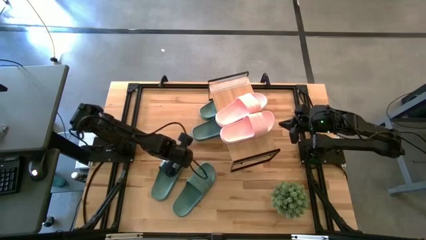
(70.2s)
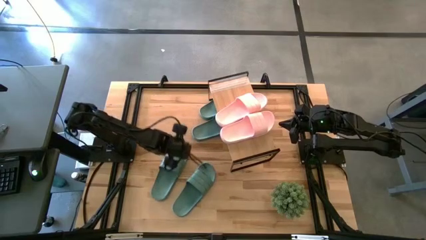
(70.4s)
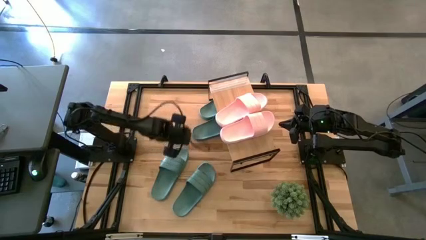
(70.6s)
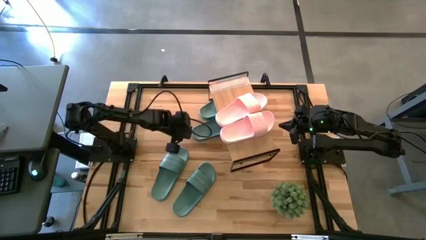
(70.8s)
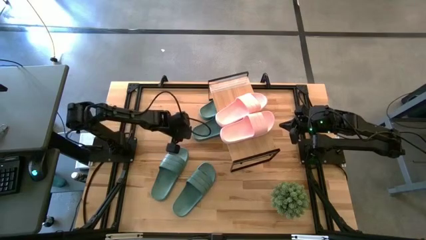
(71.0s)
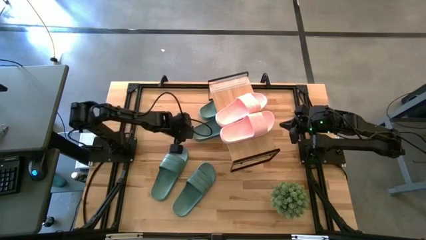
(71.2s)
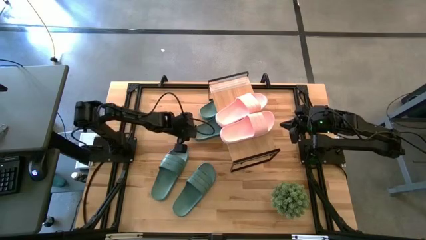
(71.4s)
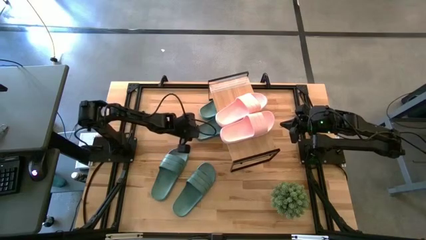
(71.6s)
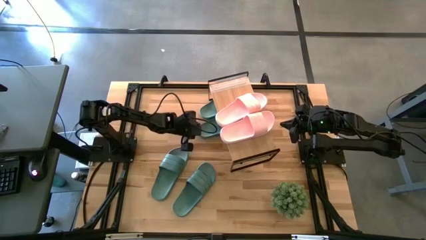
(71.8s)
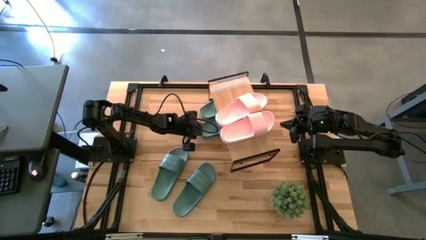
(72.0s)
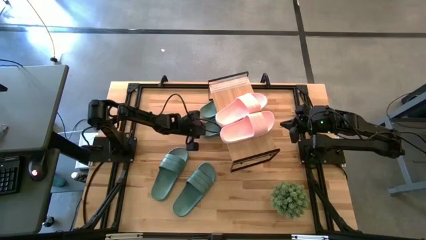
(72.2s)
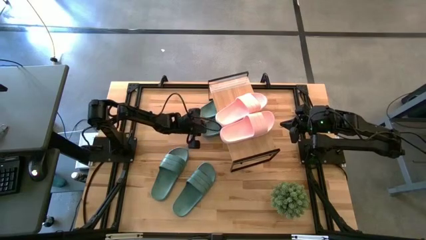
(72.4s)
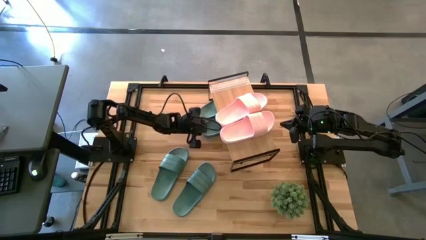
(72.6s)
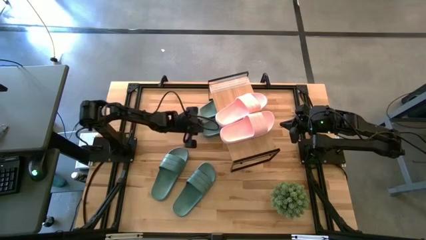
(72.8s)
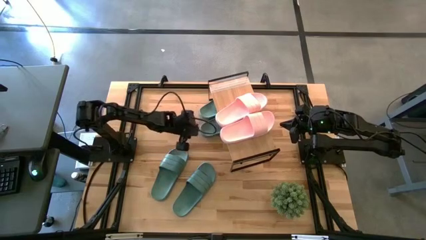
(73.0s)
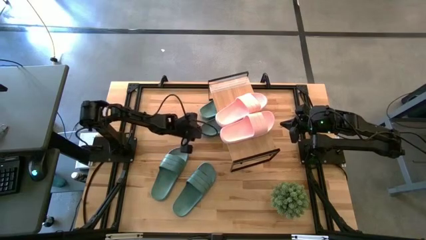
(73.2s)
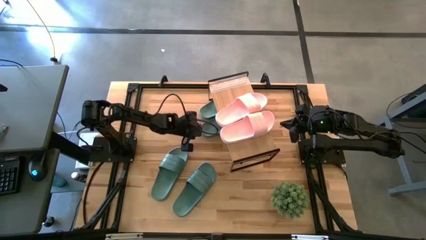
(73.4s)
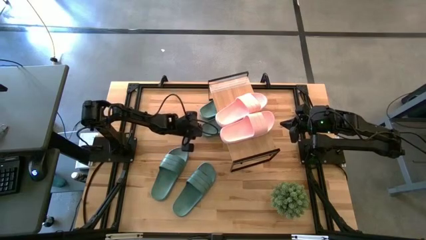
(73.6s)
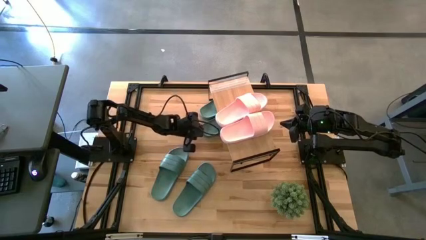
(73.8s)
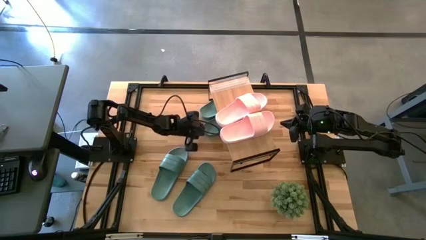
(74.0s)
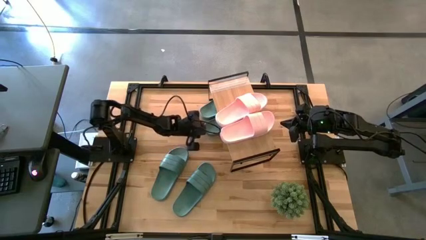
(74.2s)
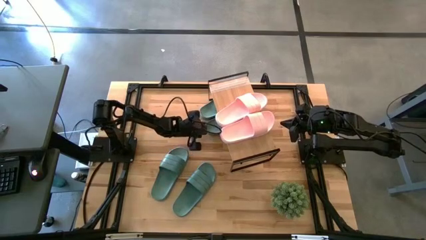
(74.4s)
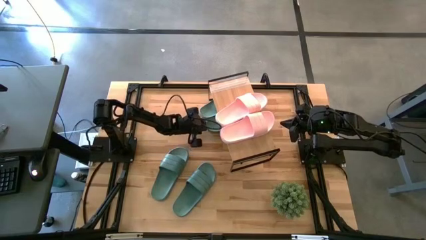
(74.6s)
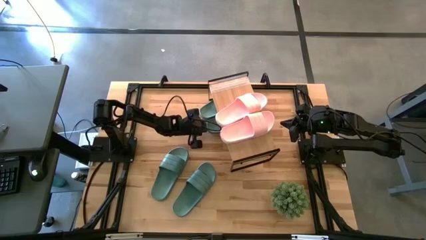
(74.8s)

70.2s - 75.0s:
Task: Pick and place slides into the shelf
Put the green slide under the shelf

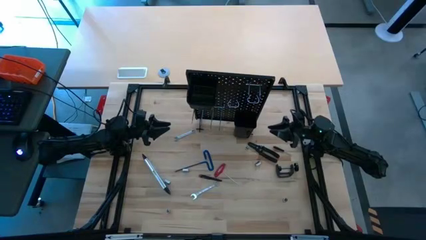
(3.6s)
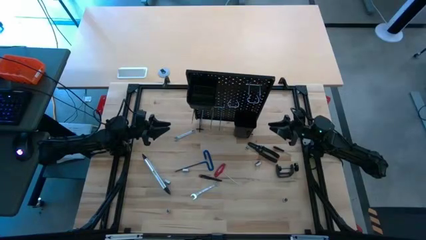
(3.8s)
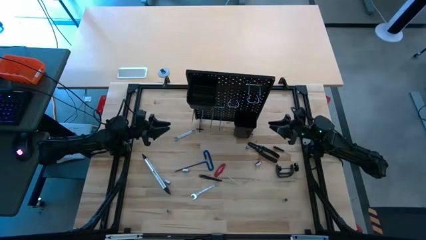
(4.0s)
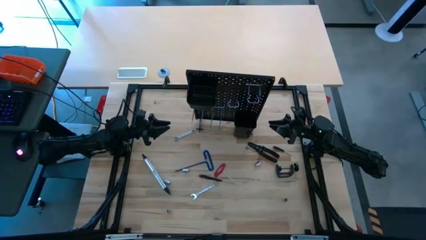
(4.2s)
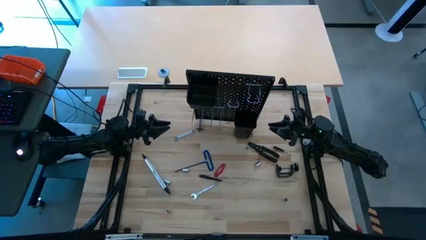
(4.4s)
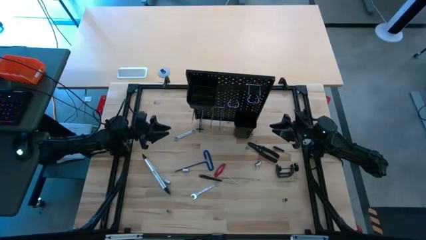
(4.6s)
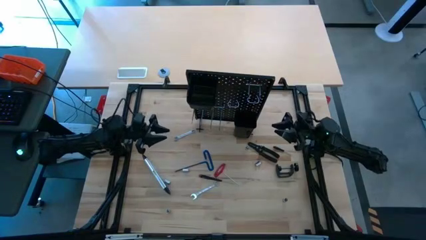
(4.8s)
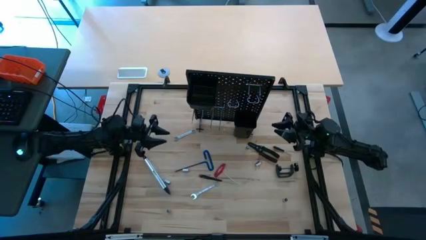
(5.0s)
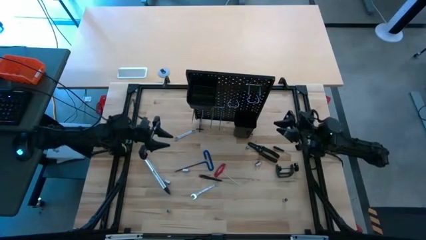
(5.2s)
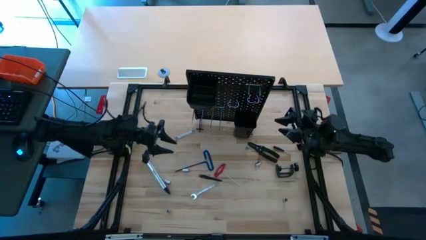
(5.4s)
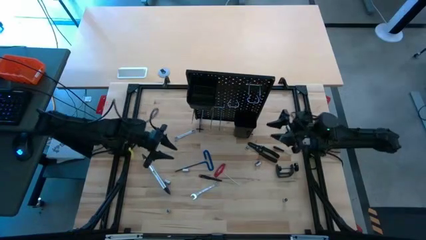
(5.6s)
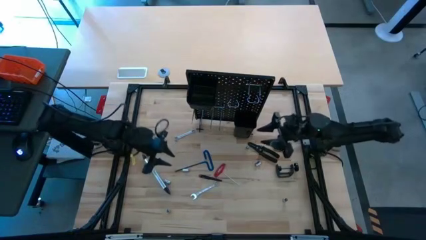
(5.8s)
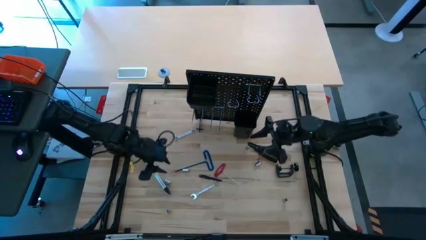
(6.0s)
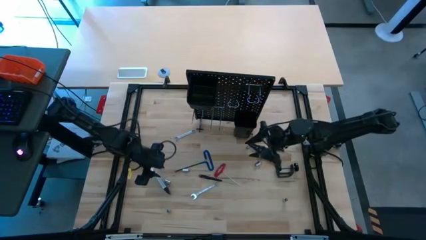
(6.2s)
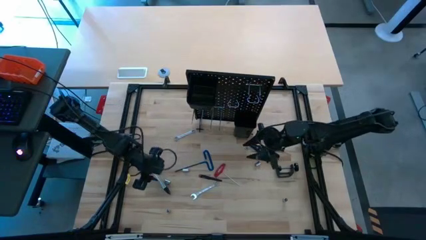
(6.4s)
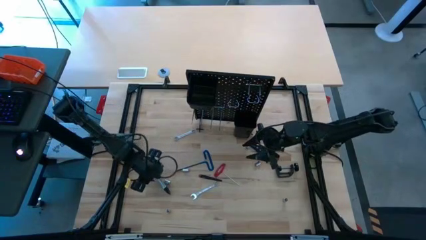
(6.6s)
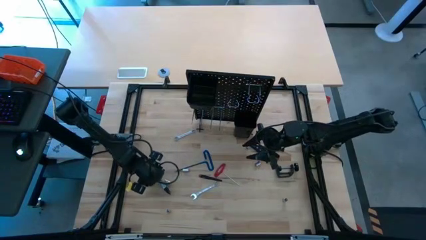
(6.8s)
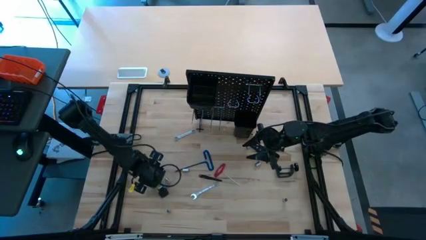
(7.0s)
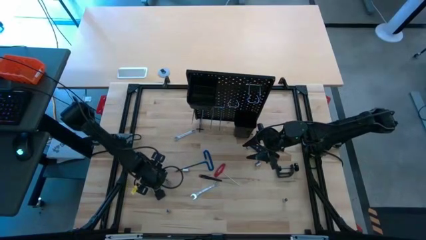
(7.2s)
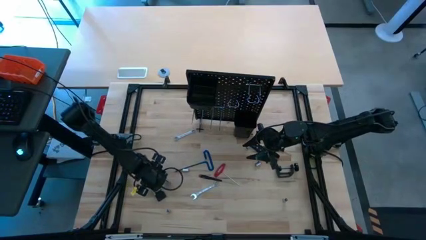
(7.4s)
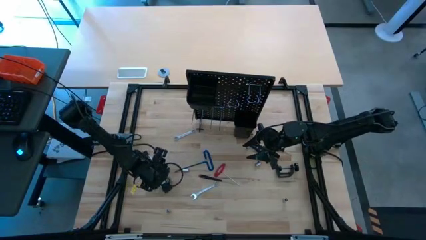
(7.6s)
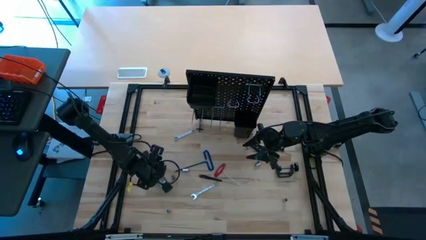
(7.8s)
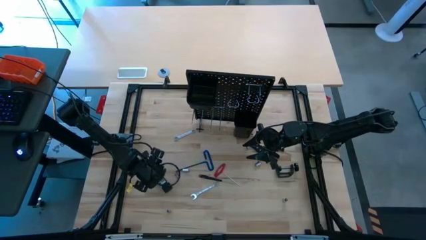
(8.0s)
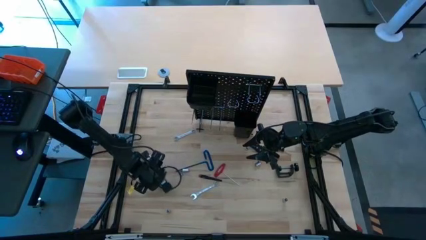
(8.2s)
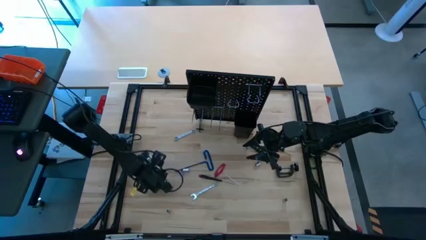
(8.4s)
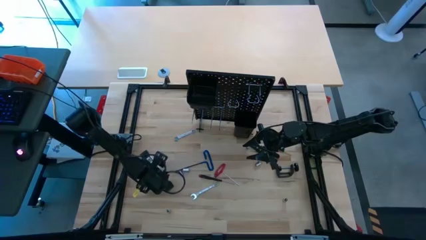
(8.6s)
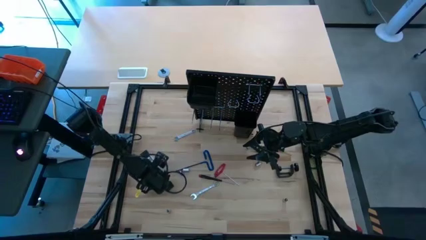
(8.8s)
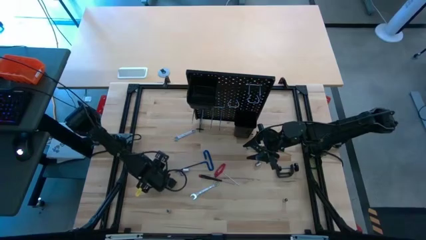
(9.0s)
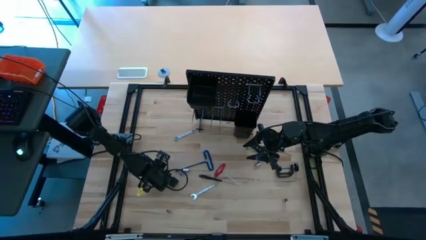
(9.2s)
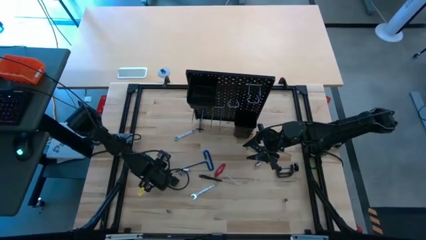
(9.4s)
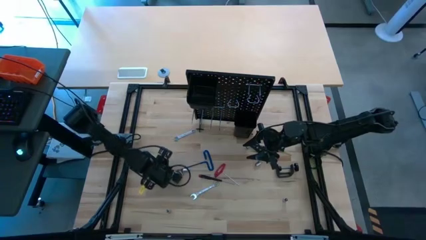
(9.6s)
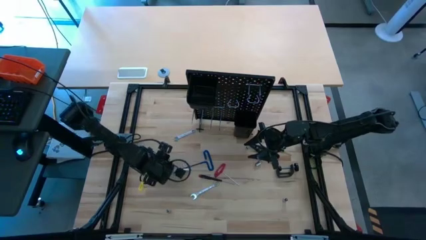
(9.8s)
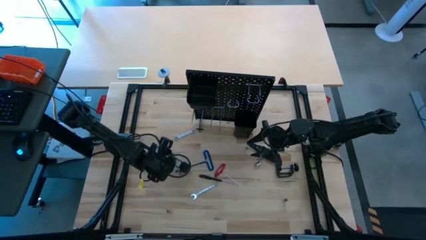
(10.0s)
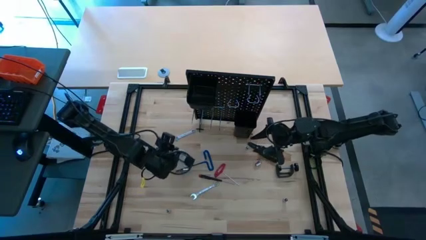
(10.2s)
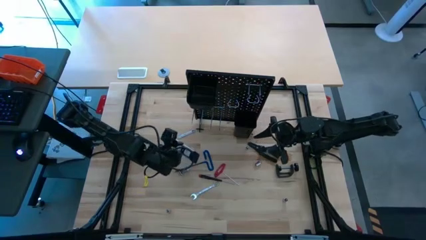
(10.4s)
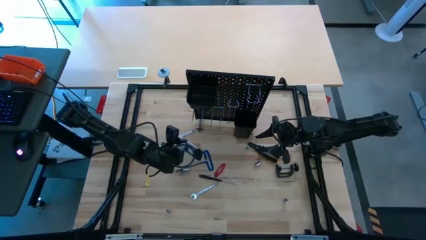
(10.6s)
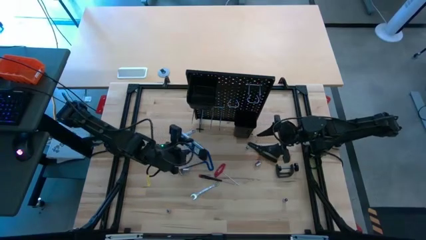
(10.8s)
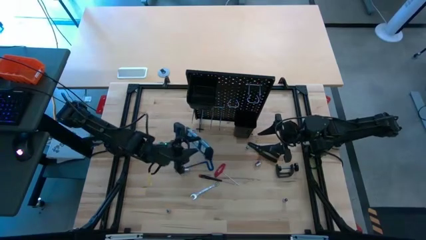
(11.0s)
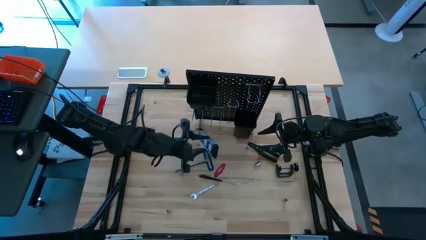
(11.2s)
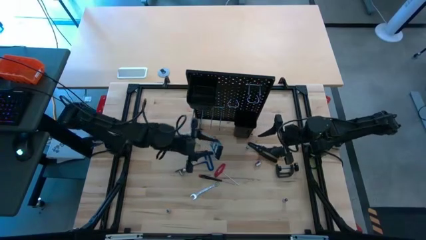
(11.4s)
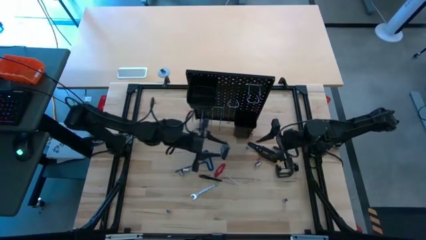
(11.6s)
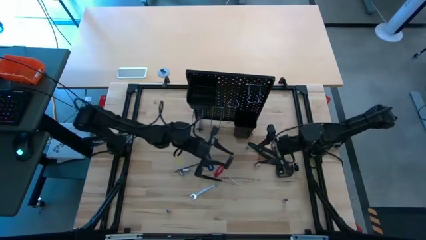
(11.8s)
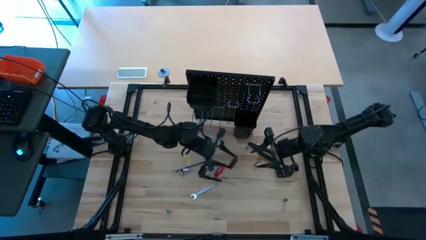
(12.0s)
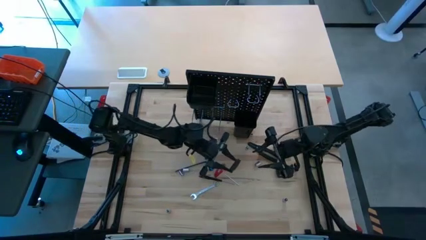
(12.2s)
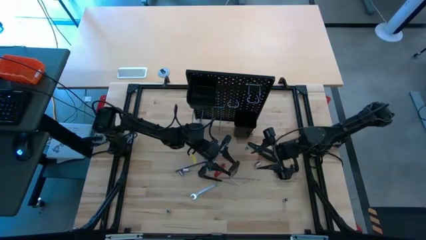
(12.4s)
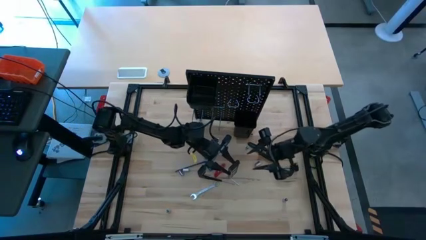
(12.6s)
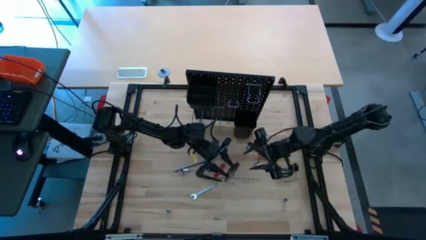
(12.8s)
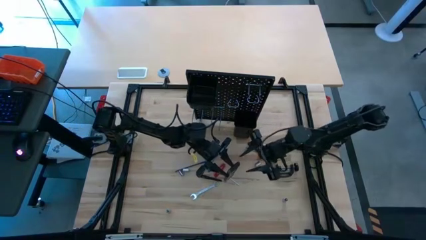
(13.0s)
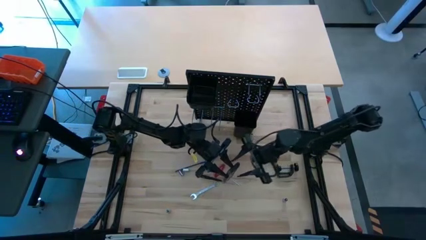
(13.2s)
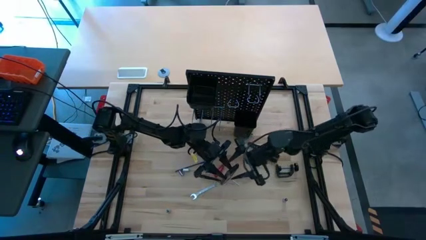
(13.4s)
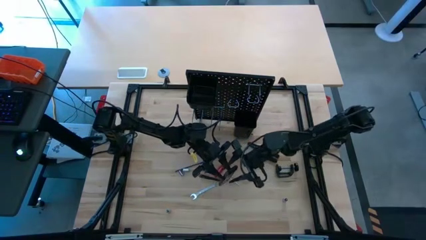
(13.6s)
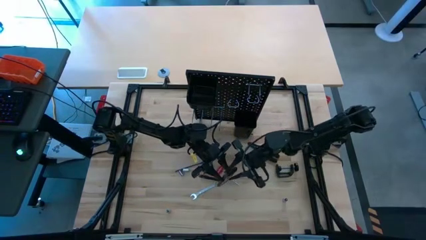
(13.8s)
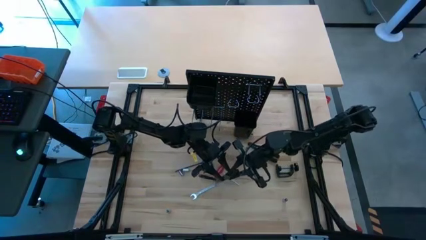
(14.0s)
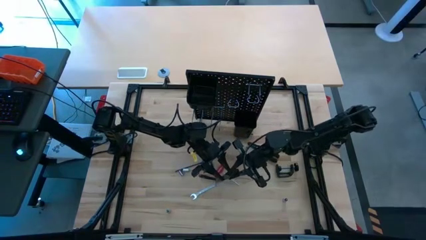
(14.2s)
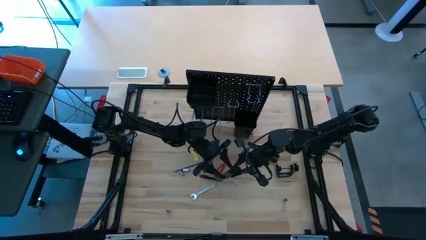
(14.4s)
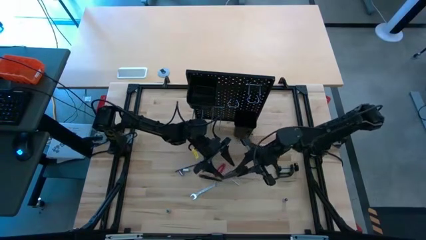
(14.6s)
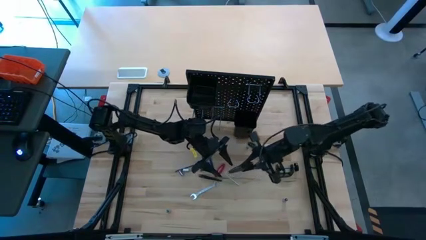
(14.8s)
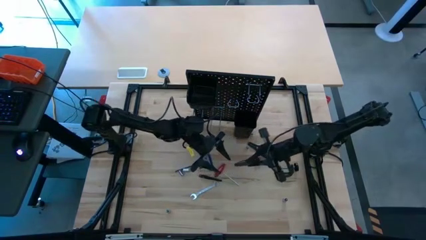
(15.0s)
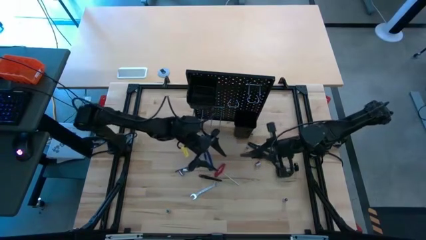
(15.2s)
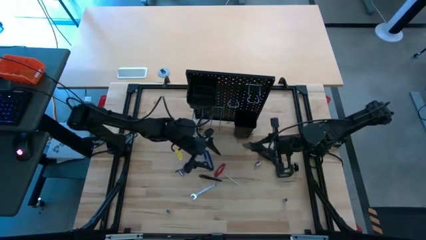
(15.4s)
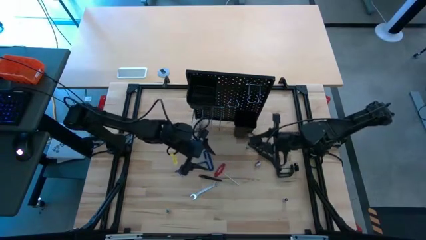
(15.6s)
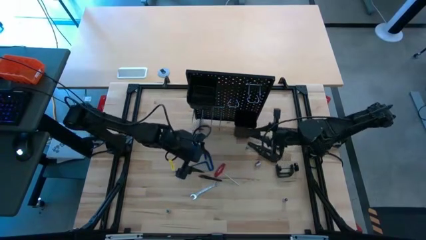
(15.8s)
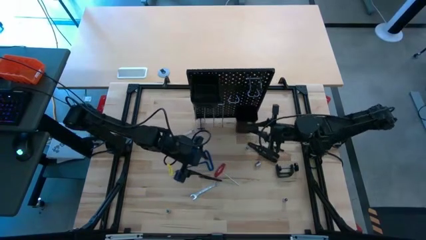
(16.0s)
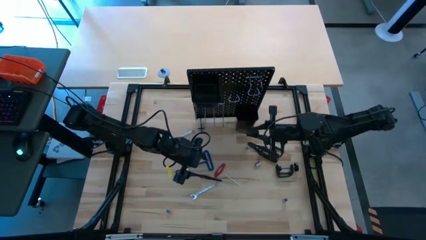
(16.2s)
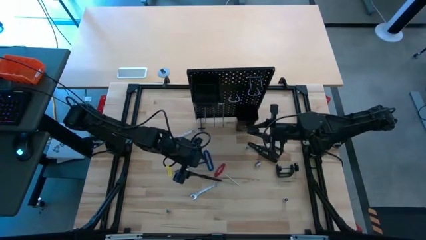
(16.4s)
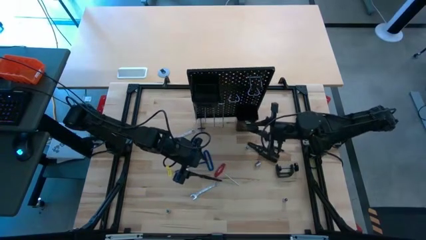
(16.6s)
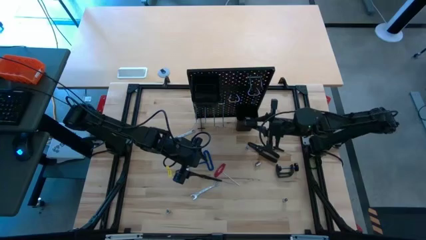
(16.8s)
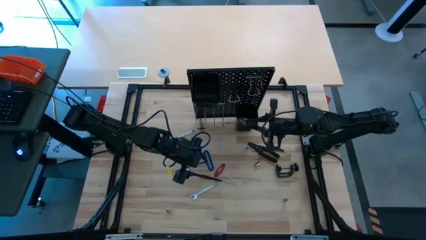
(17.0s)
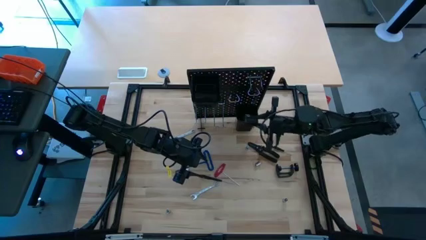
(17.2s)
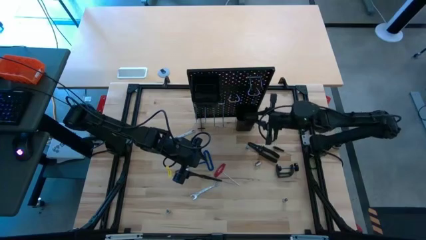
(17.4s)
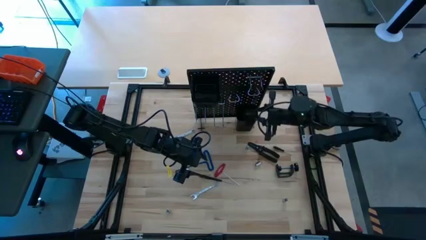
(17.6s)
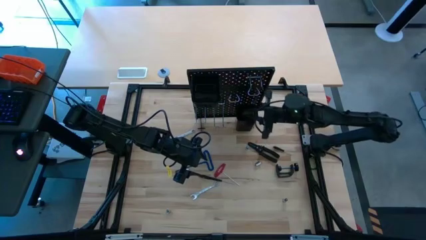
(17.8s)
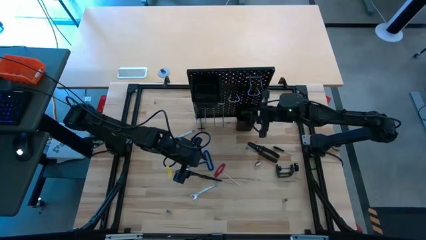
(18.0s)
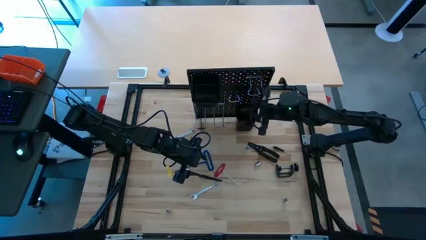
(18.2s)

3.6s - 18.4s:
Task: Hang tools onto peg board
Put the spirit level into the bottom black bin on the pegboard
